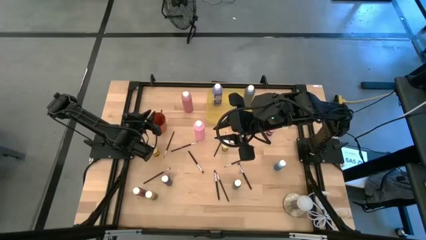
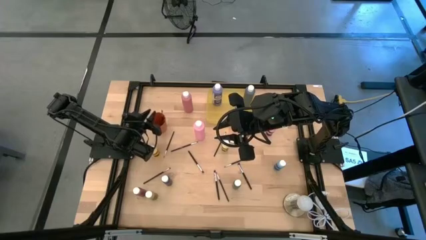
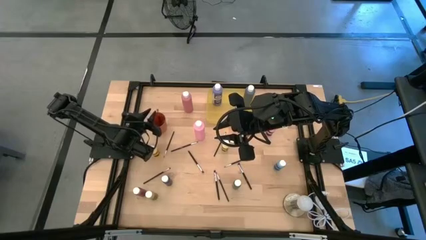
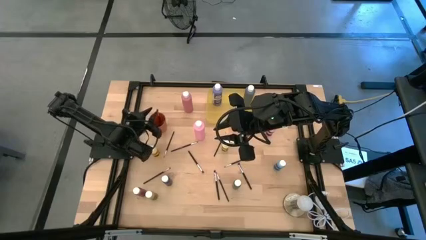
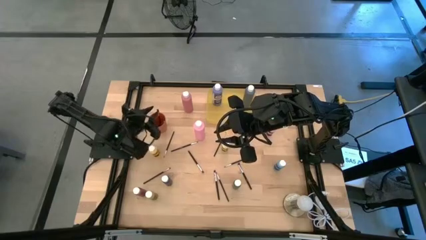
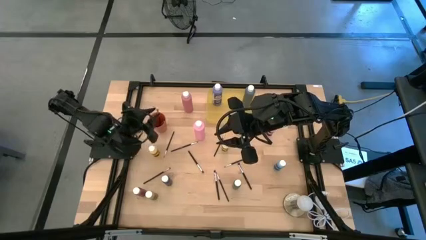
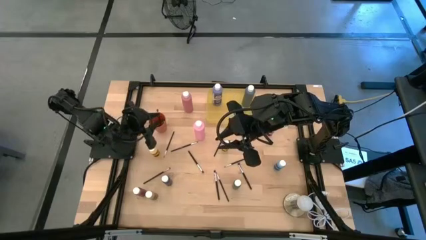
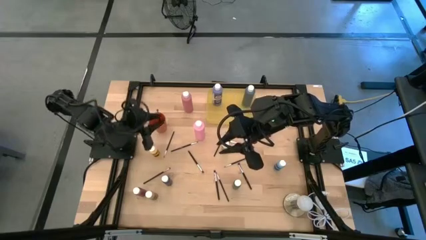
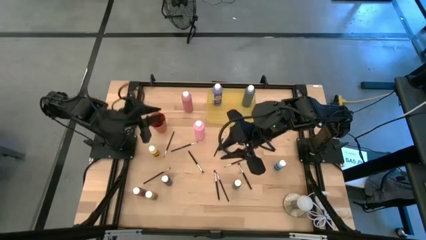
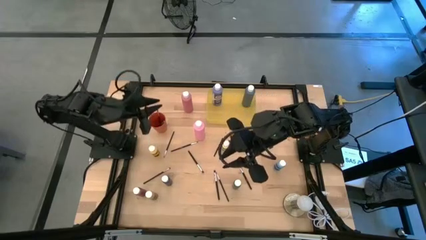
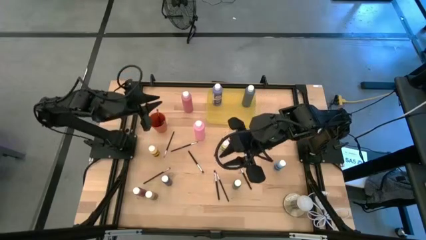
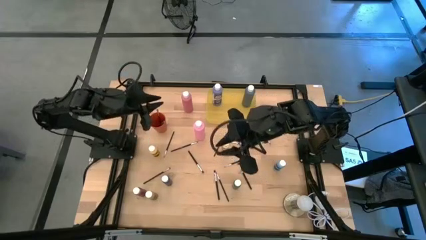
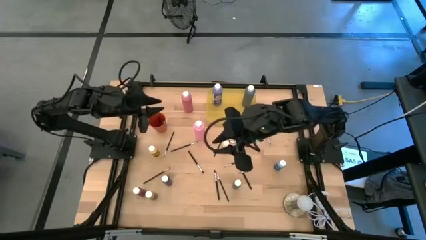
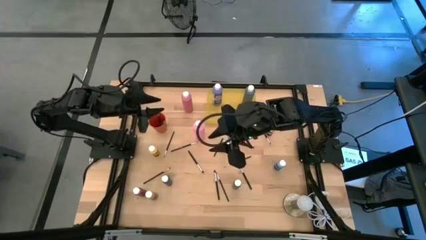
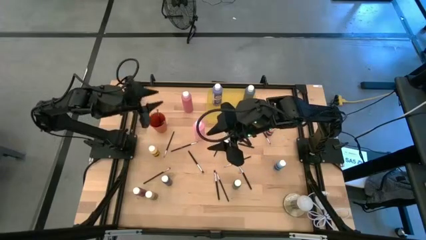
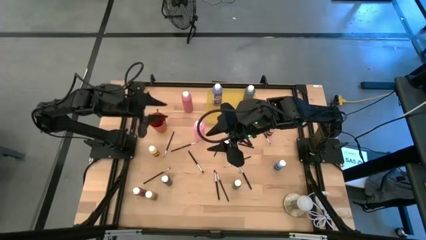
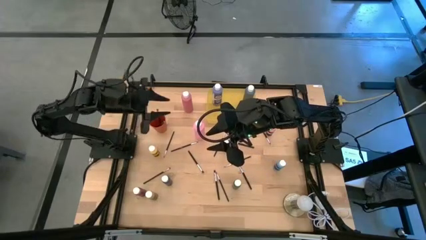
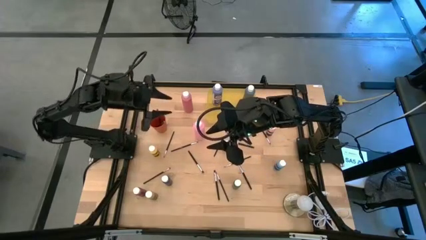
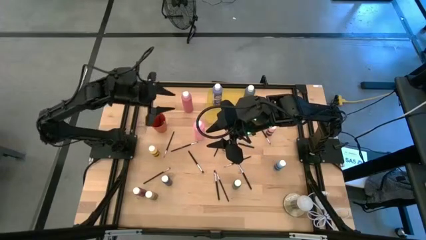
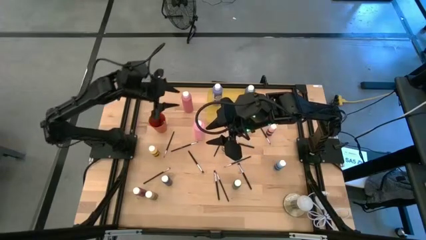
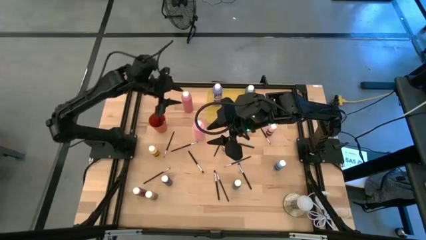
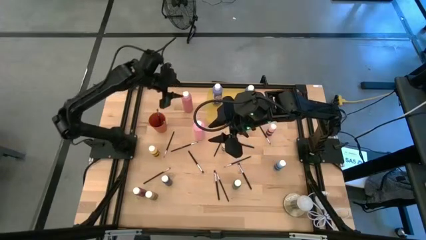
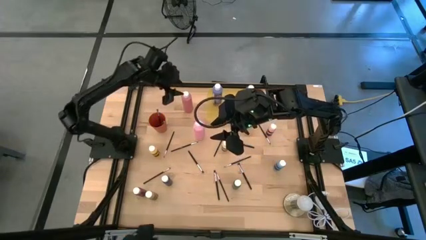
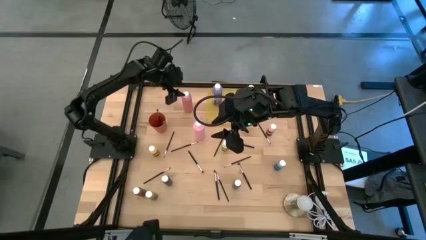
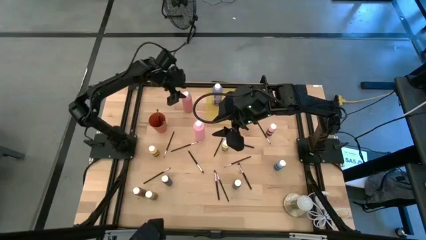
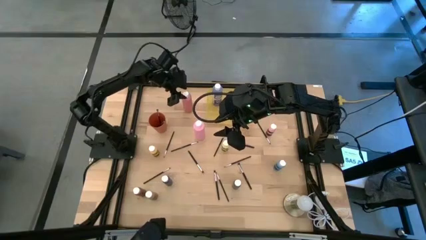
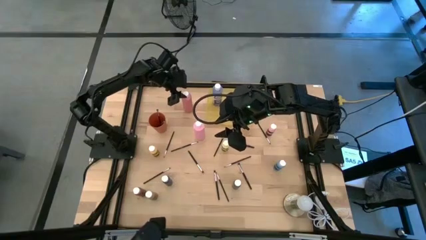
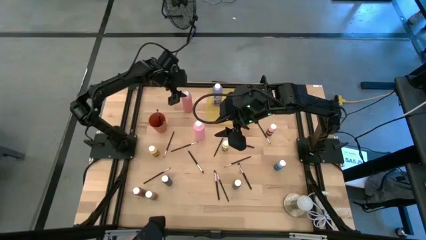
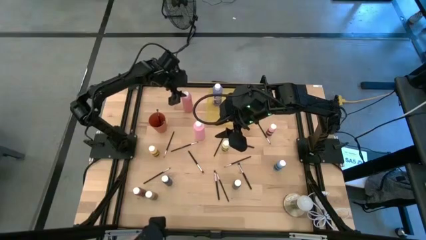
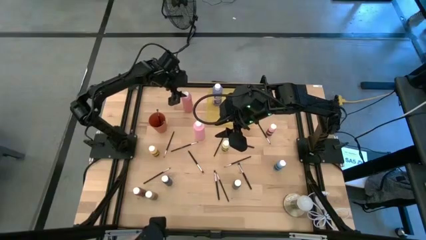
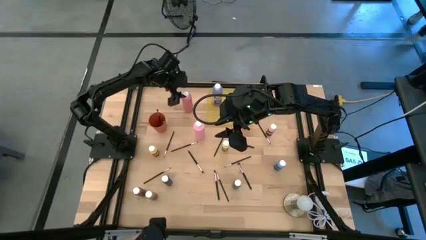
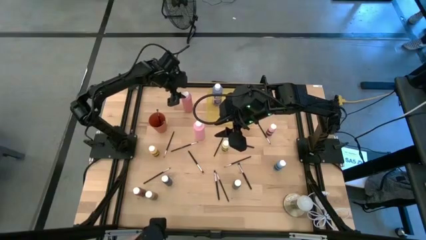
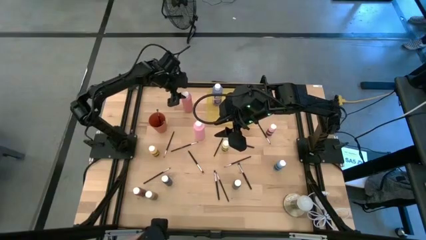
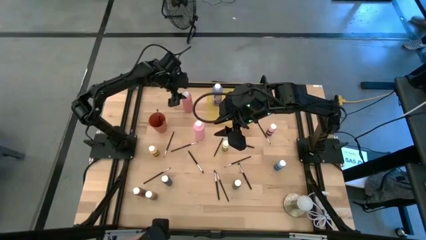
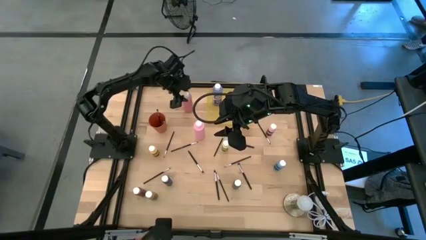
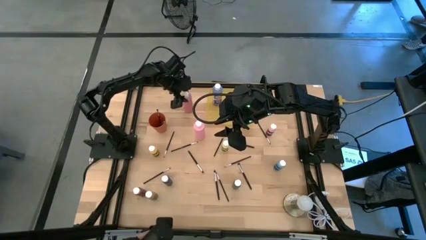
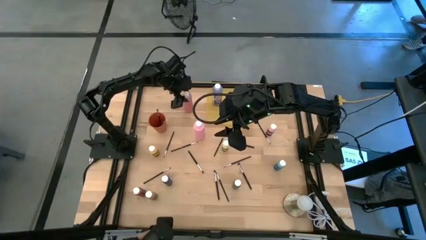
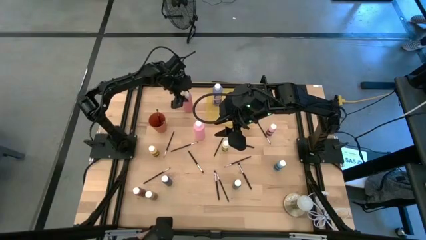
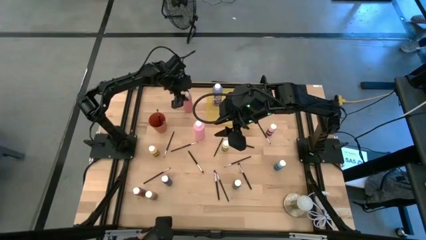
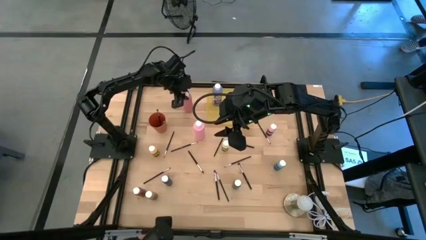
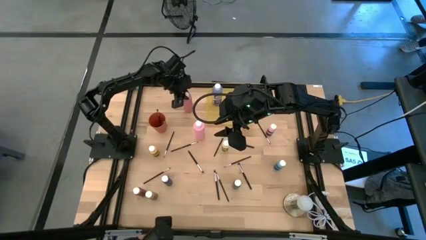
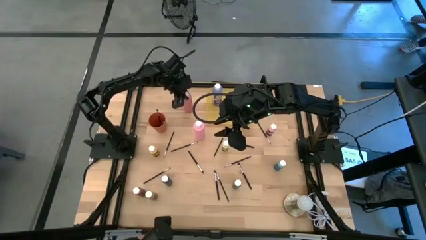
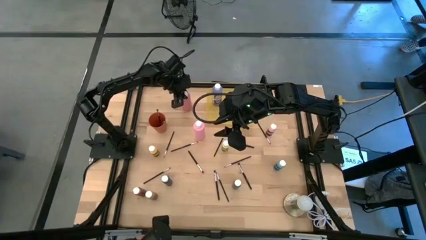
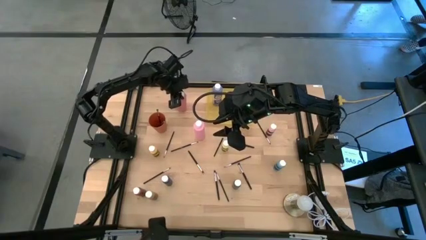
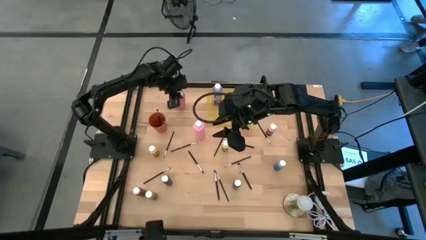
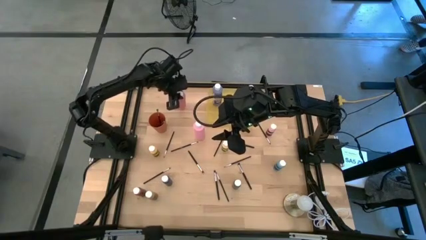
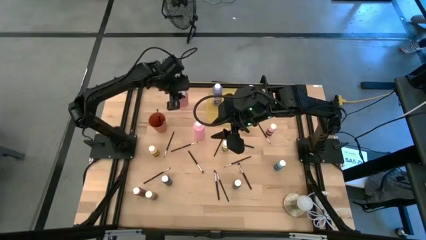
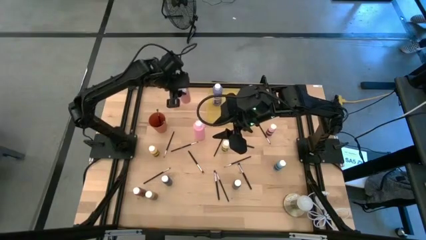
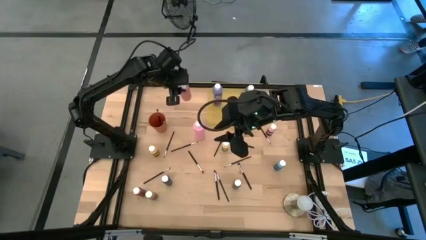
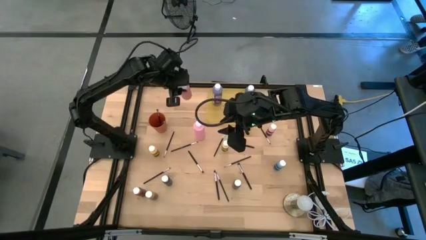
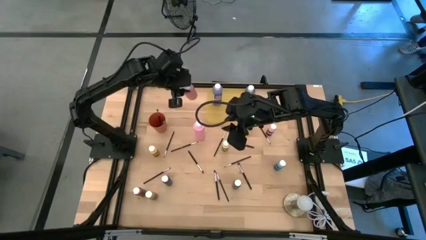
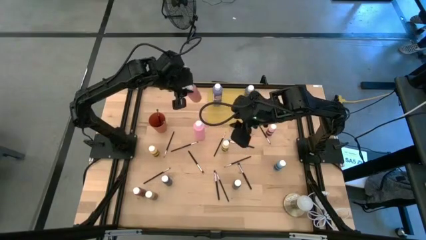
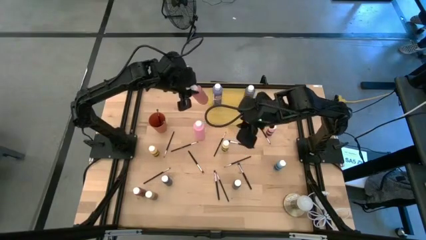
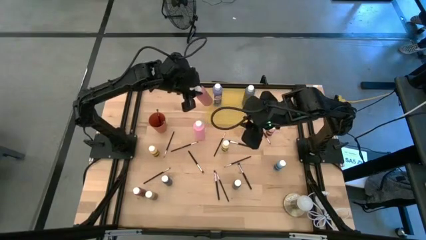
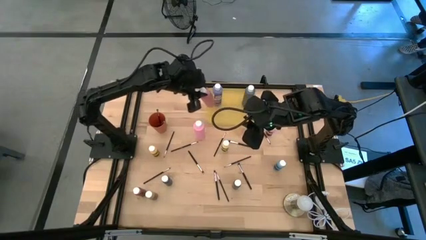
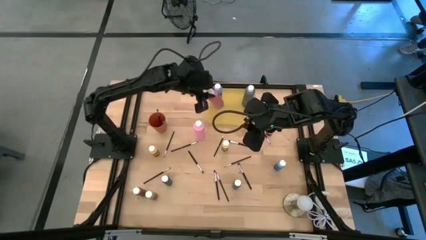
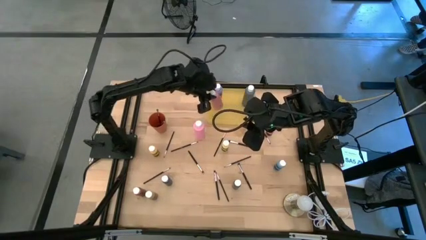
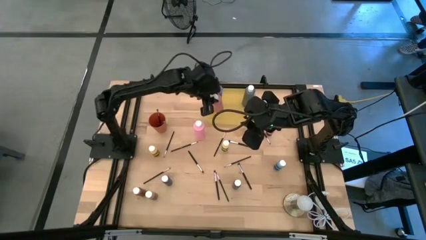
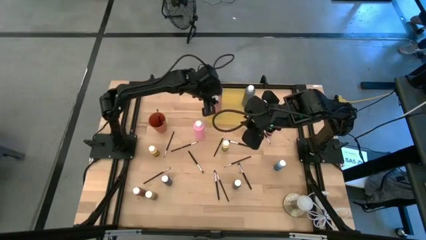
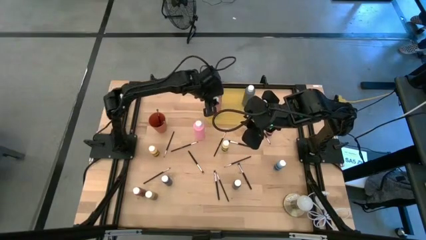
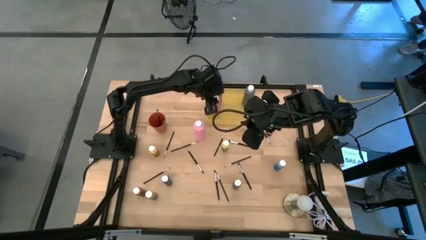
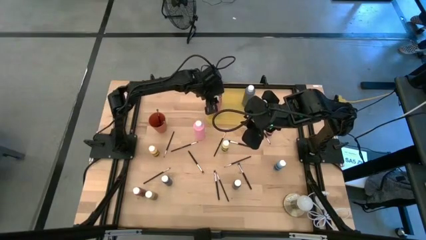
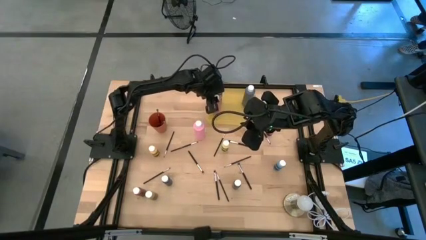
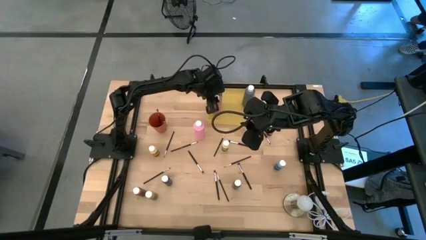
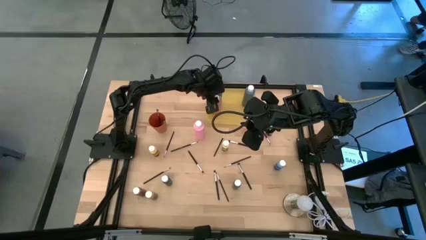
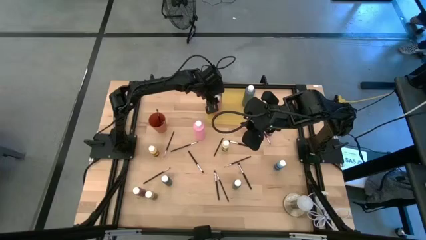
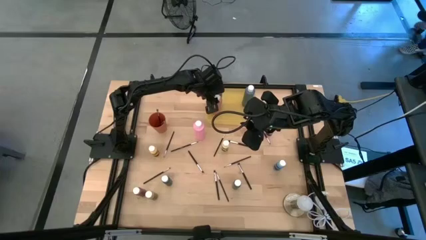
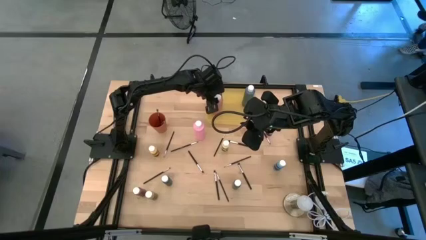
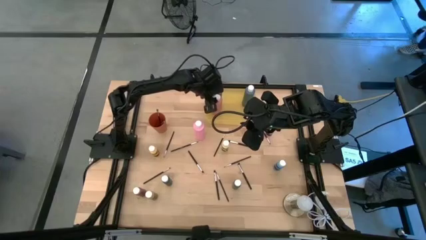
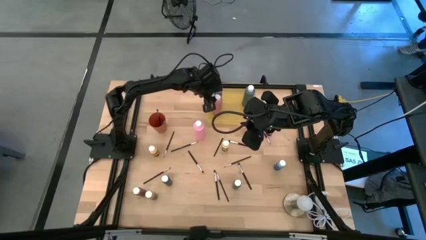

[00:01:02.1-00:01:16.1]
Task: Pick & Place Paint Supplies
Put the large dark pink paint bottle into the yellow bin

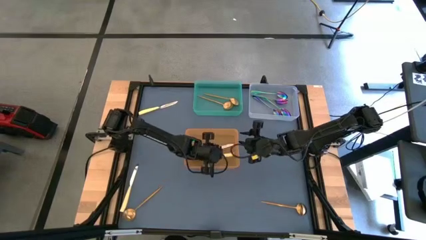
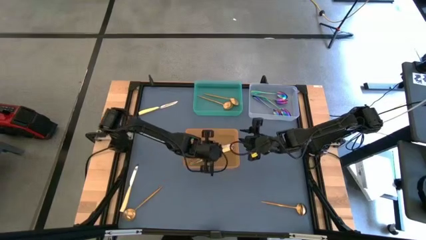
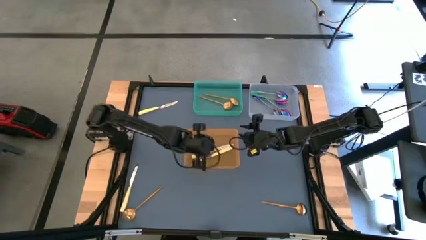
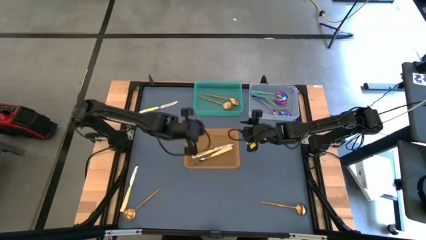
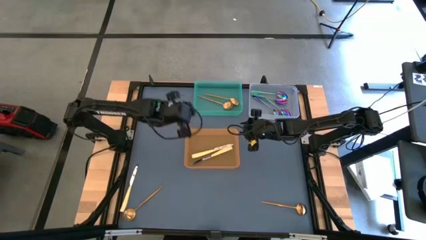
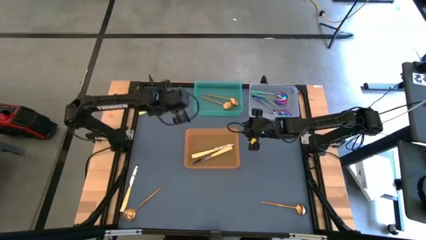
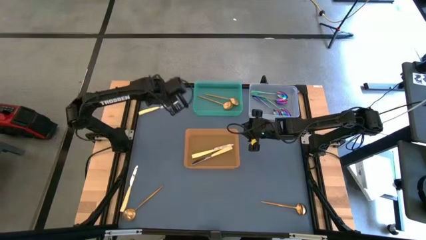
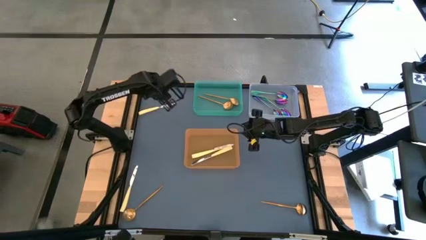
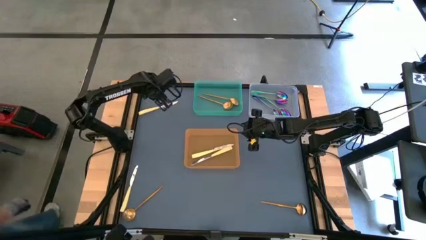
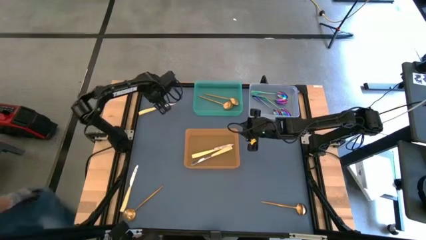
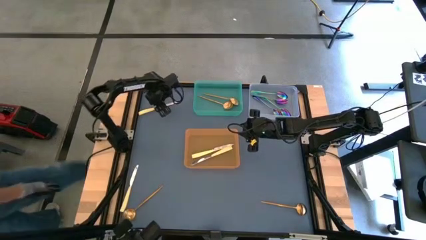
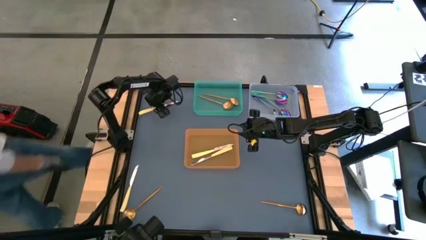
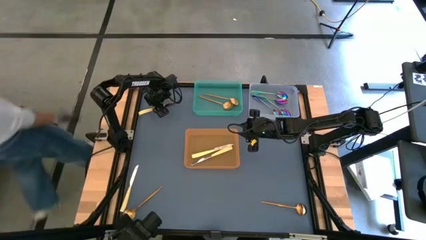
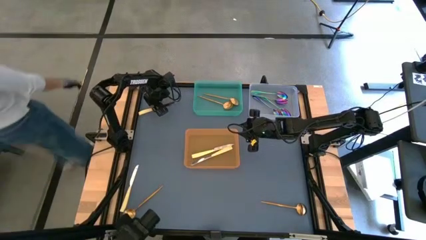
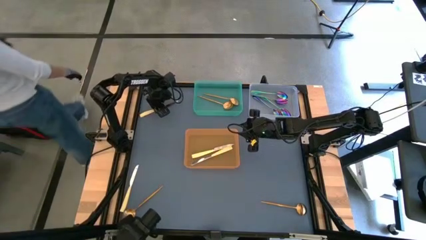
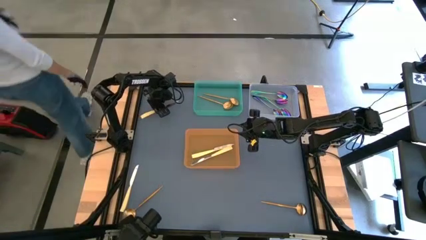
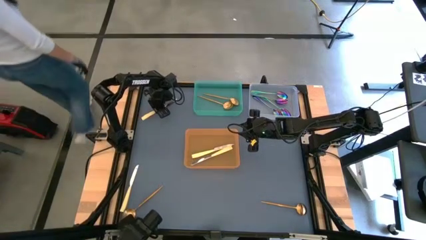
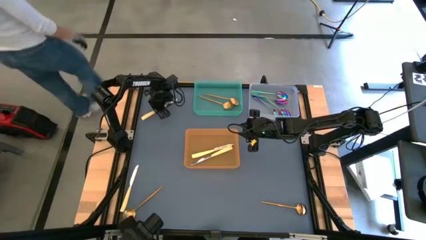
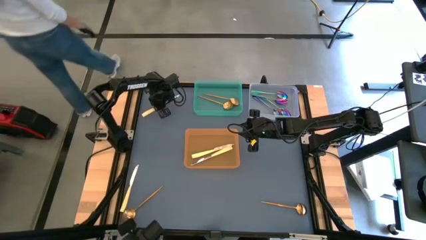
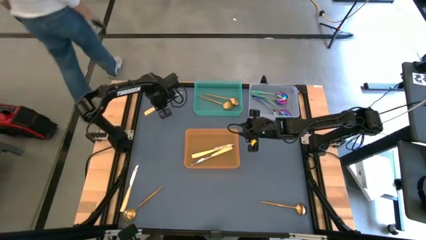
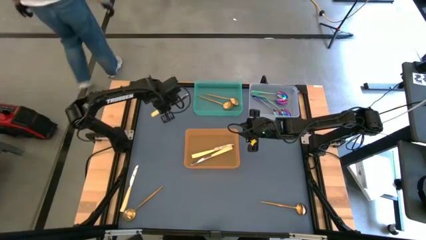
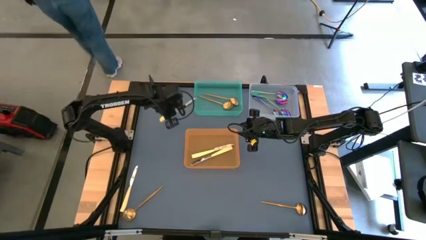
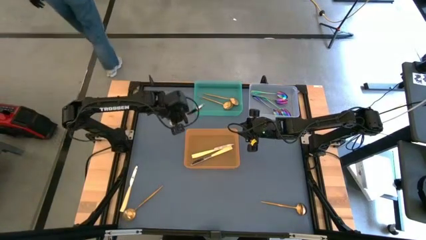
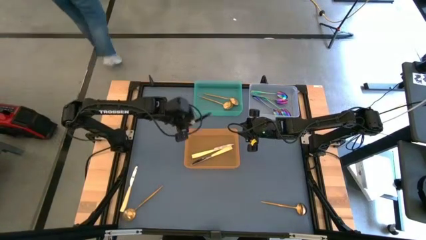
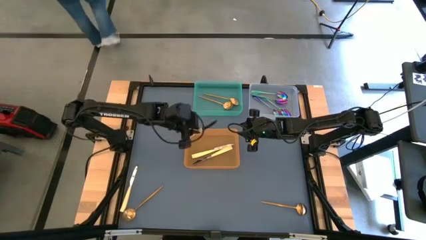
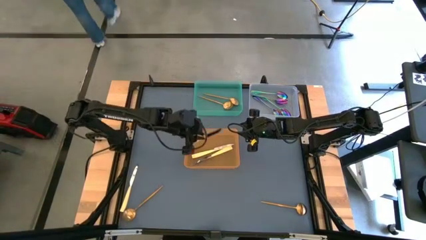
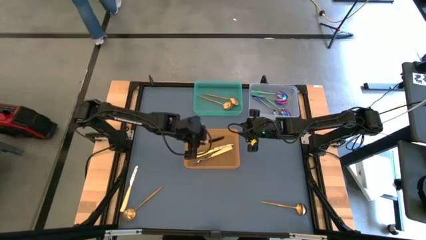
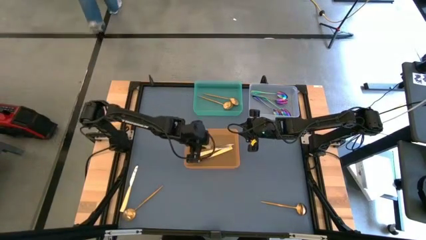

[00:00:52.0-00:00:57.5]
Task: Sort silverware by color (type)
Put the yellow knife into the orange bin
